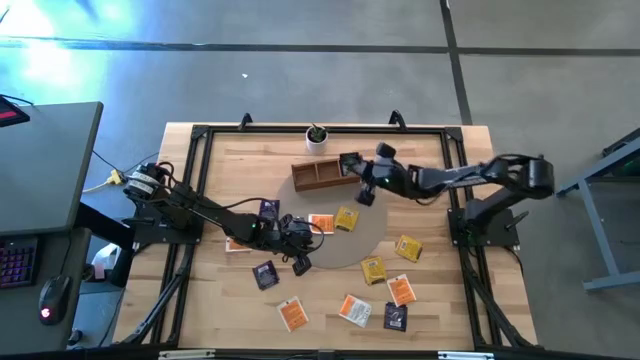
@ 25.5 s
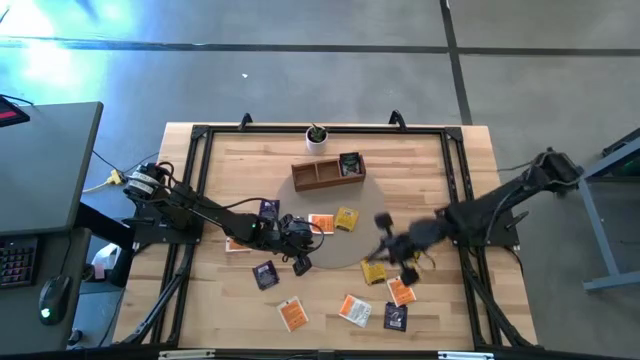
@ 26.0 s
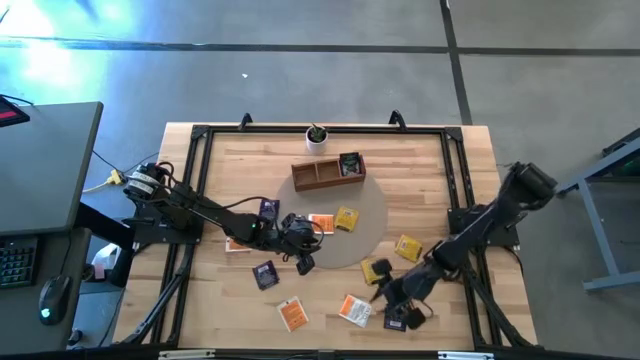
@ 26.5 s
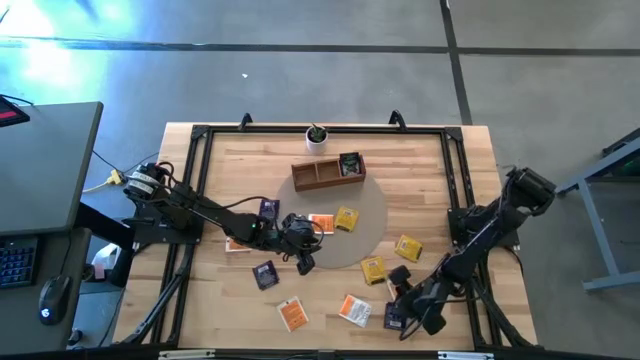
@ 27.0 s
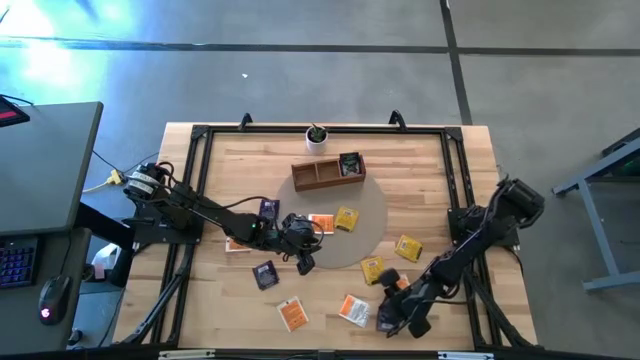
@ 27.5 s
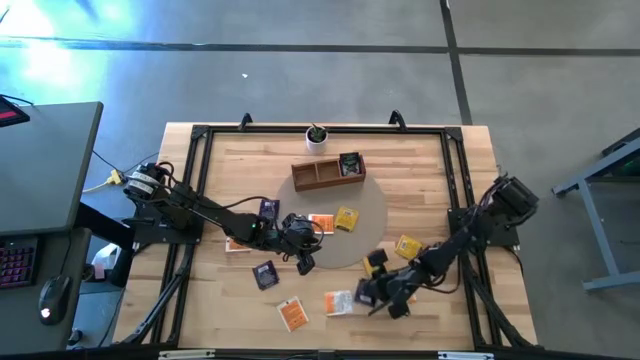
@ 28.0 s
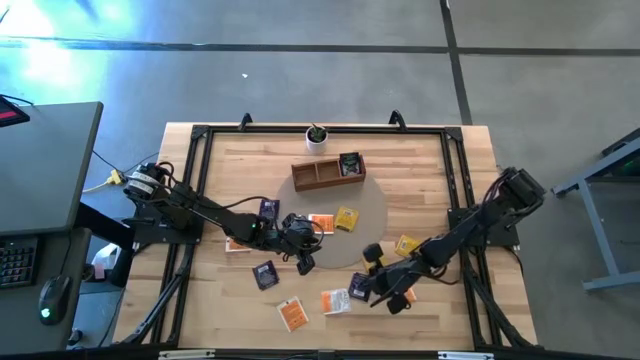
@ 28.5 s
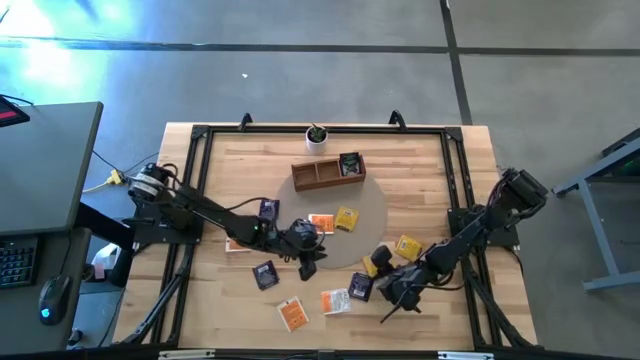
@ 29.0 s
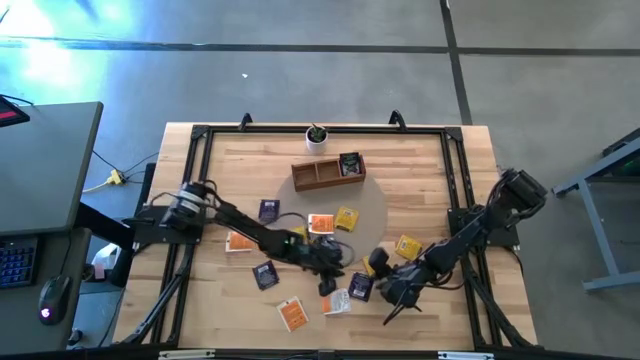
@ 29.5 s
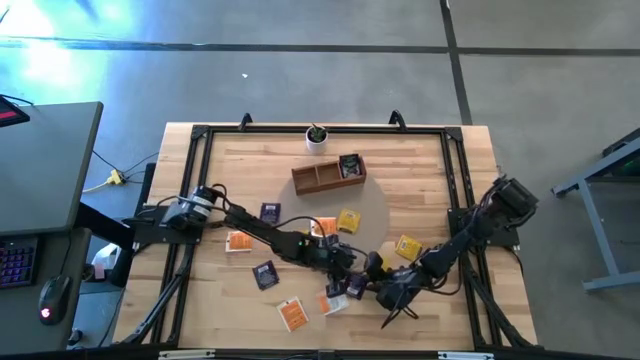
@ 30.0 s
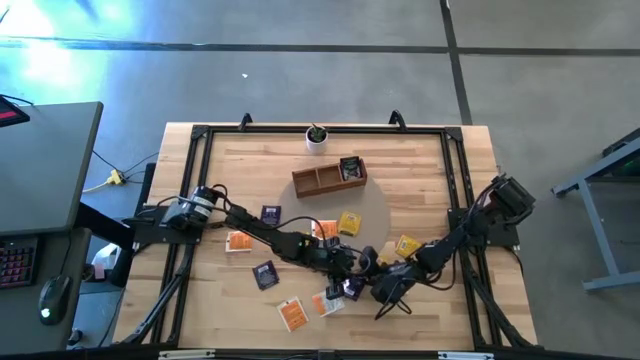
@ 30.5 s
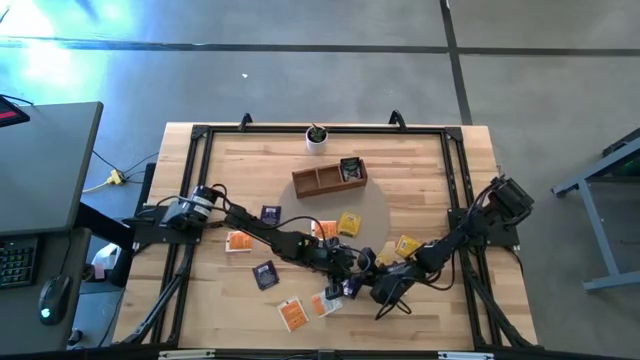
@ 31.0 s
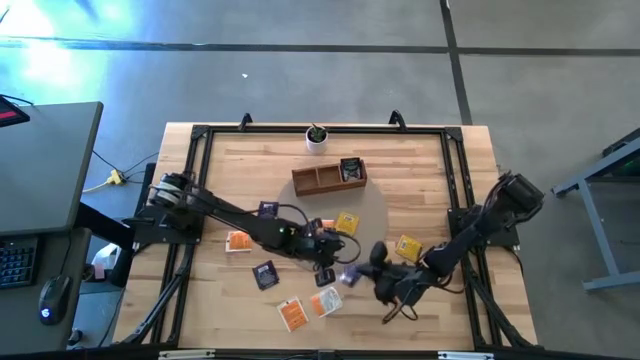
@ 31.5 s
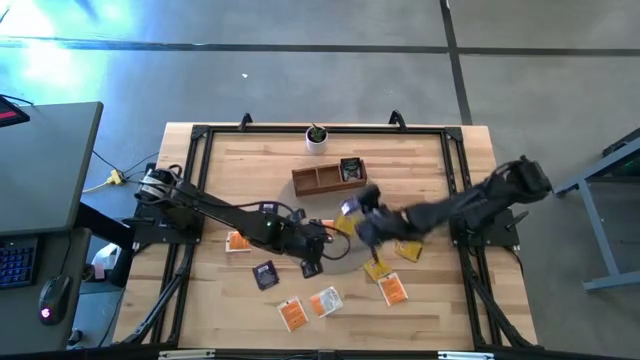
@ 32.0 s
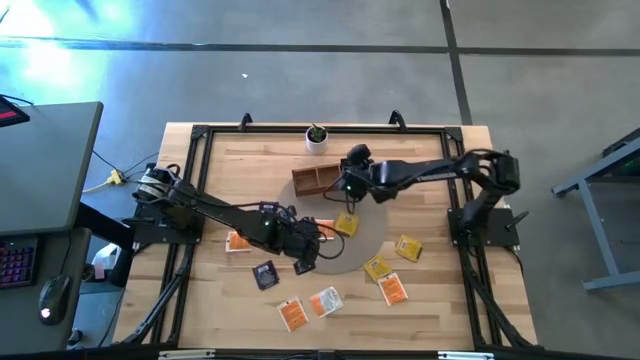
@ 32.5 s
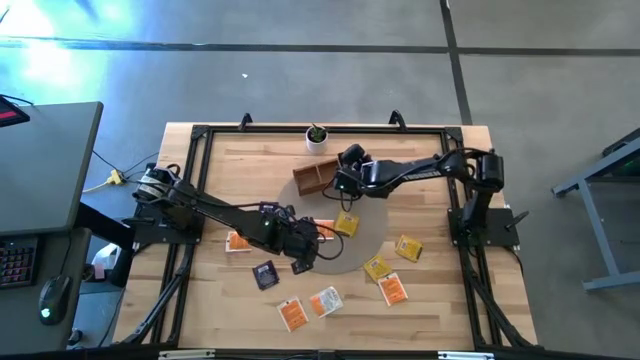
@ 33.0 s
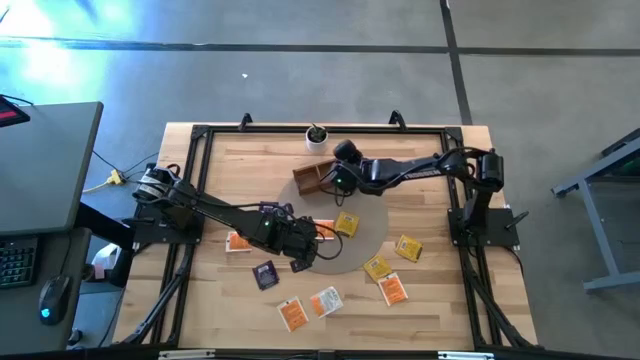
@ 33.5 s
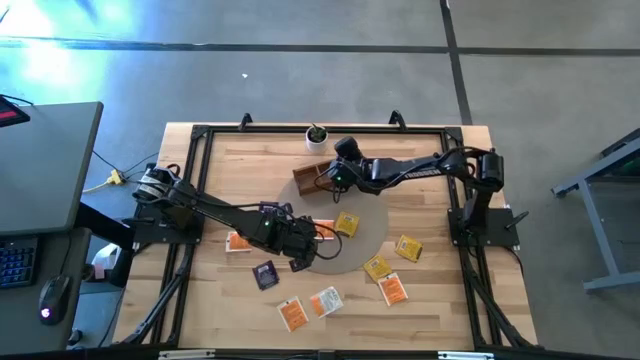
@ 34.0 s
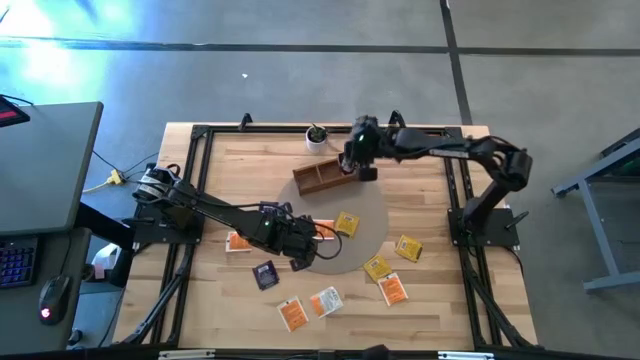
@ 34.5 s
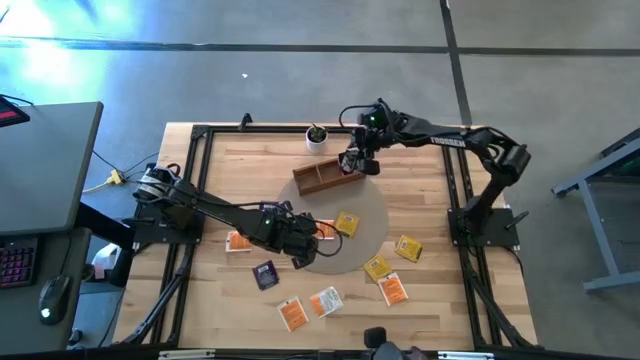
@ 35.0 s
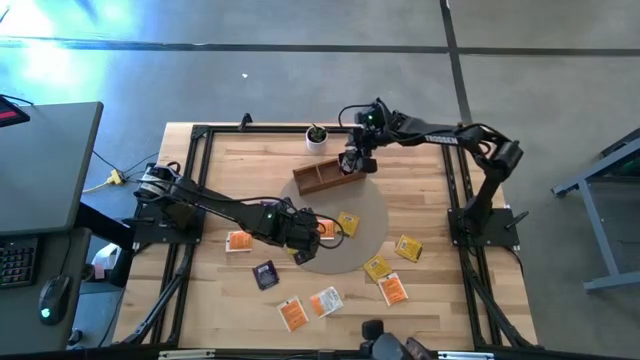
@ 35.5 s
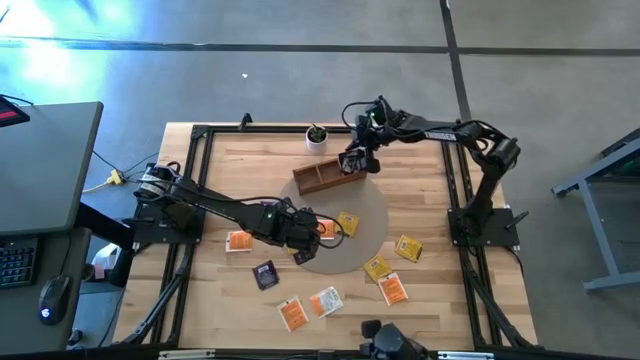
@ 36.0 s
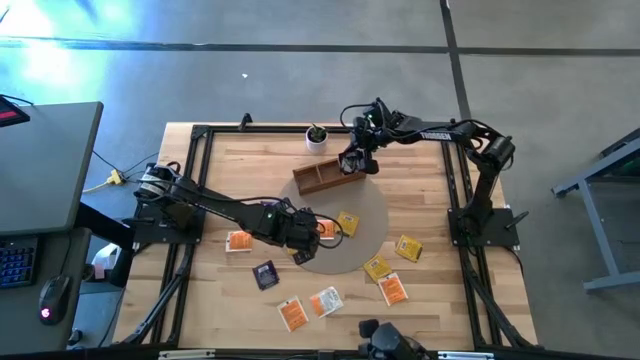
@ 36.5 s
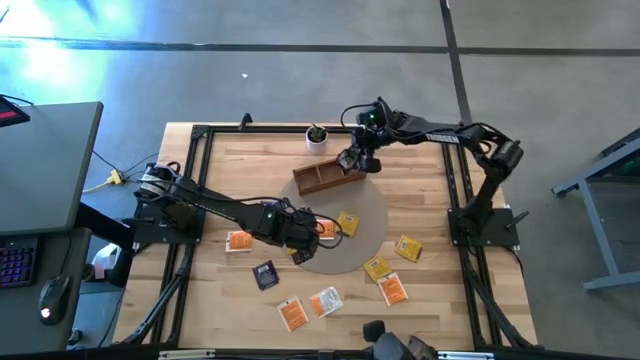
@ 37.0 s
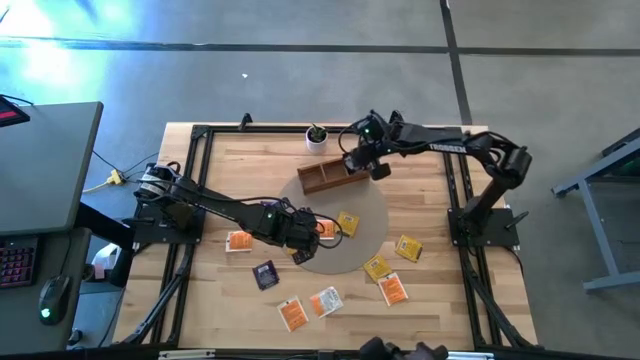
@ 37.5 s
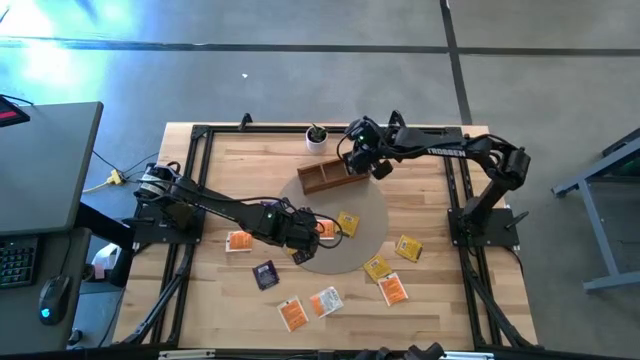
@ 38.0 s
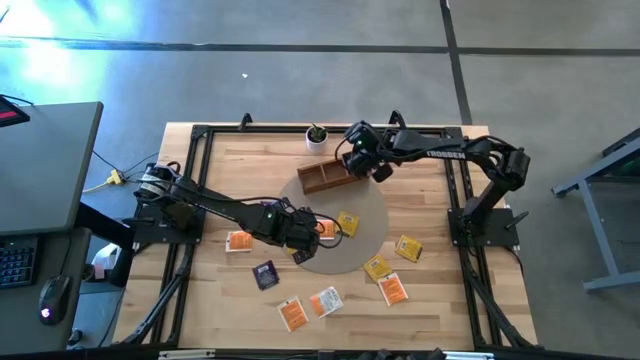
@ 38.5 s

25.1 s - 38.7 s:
Task: Pick & Place Tea
Put the bottom purple tea bag into the right section of the wooden organizer

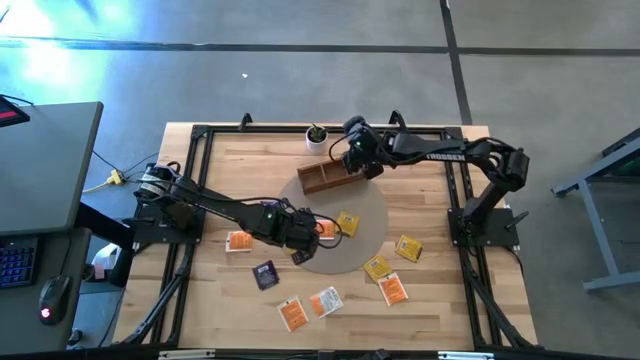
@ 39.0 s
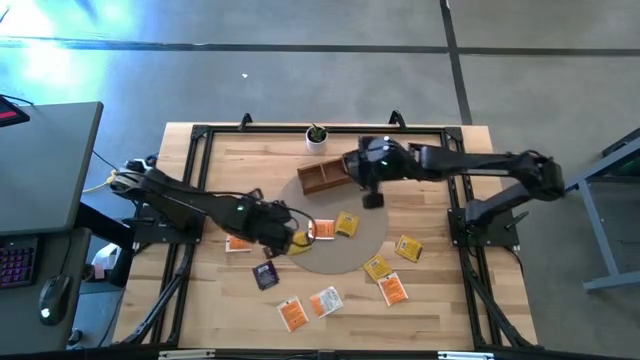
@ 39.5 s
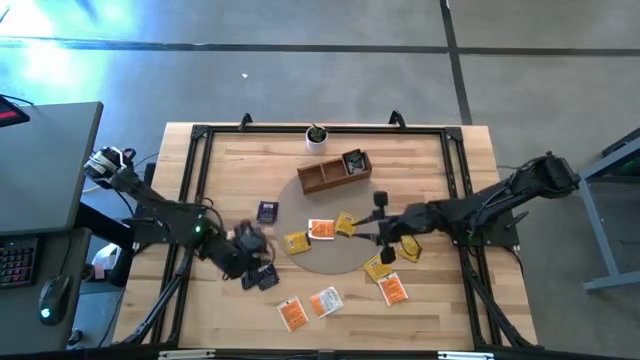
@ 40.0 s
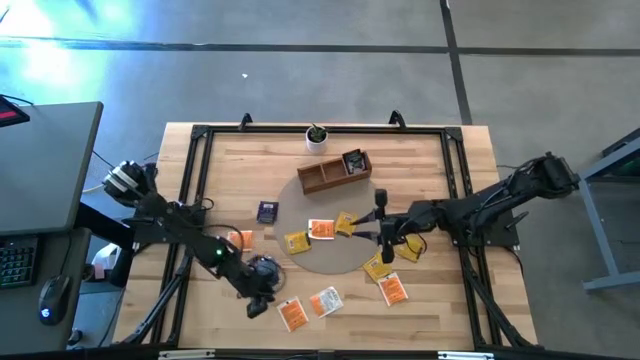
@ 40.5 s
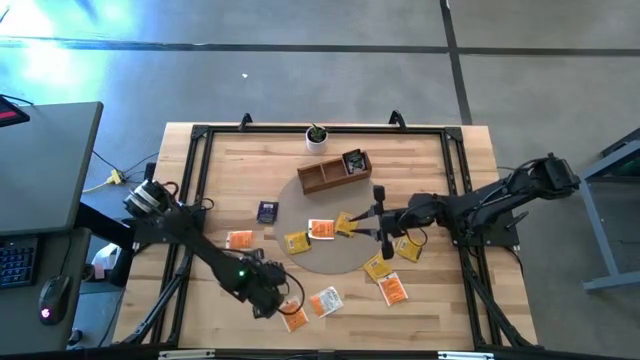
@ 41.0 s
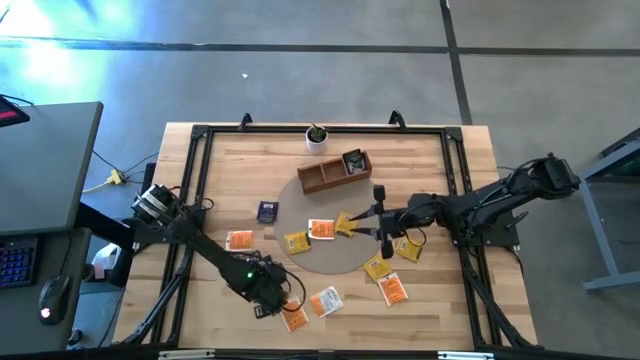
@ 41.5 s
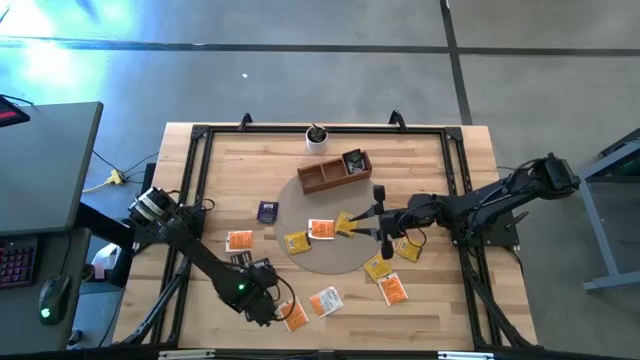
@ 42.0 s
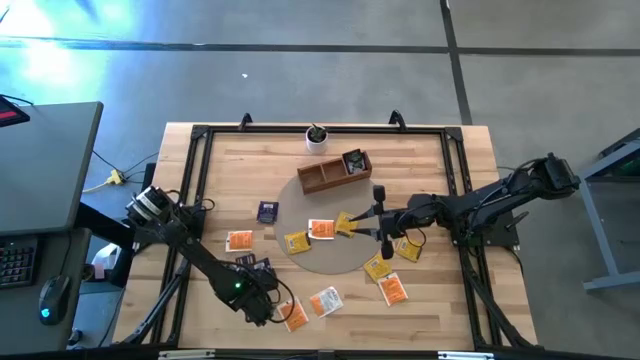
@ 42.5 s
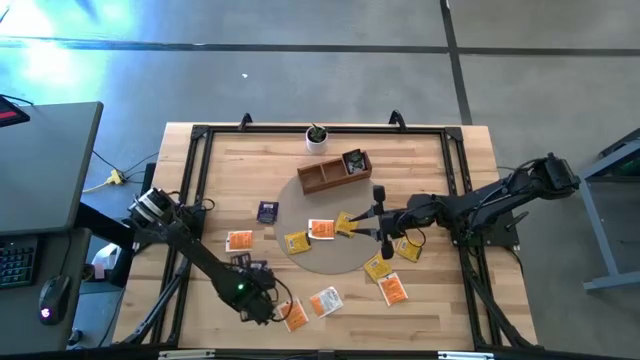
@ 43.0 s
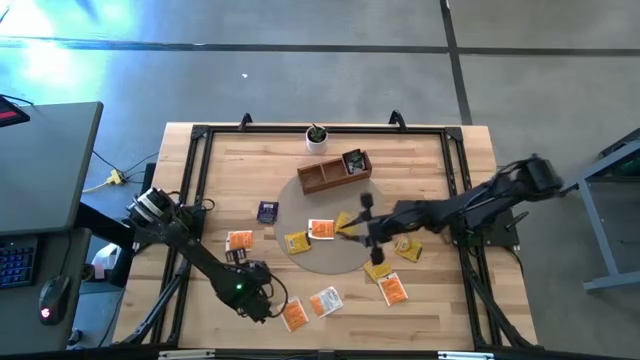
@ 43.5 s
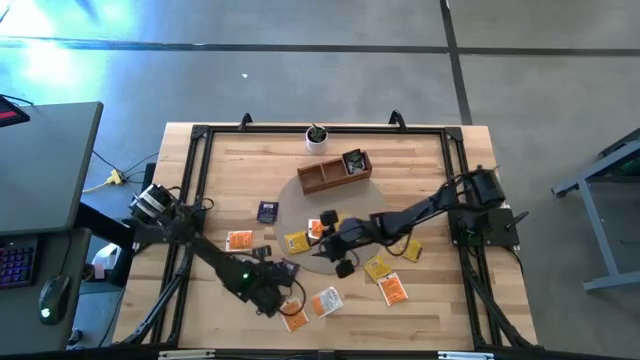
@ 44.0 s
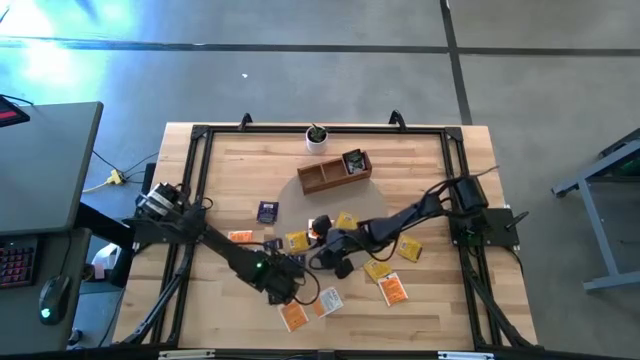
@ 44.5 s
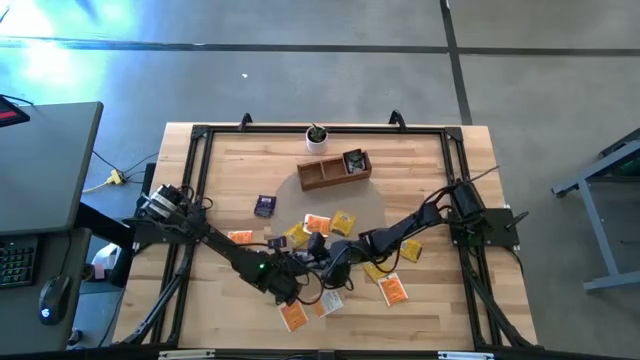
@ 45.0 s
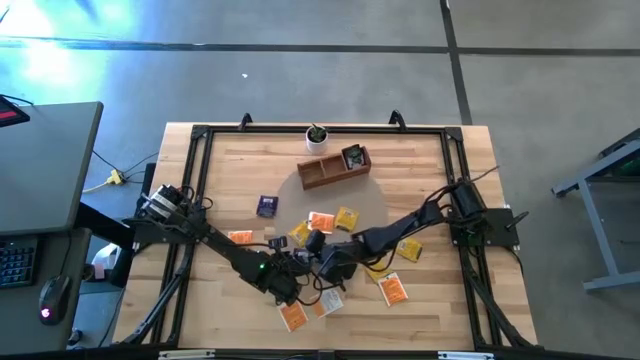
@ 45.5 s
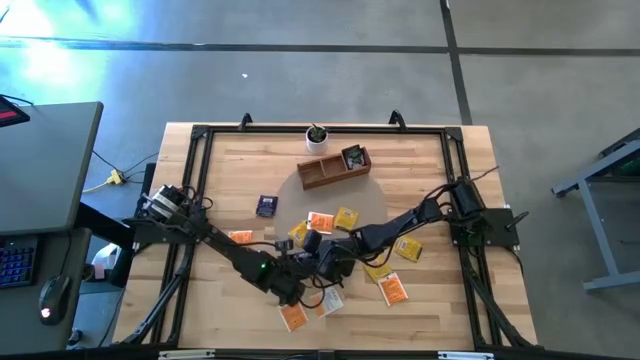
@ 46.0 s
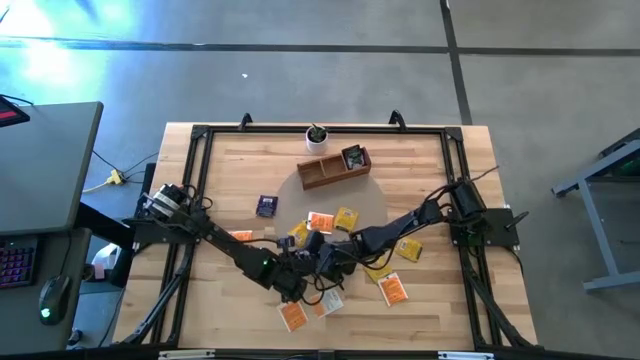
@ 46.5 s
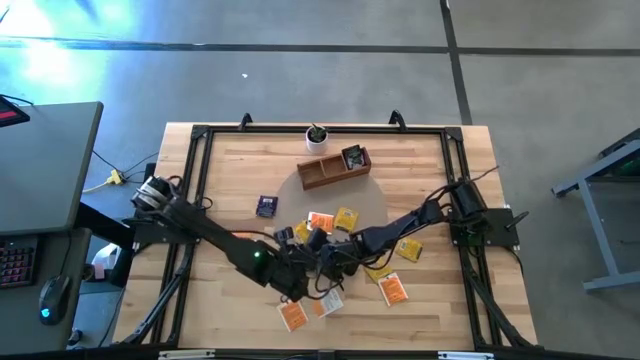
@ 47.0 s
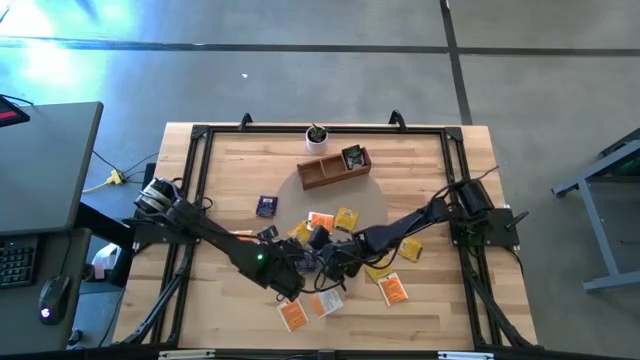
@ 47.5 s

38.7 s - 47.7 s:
Put the bottom purple tea bag into the right section of the wooden organizer
